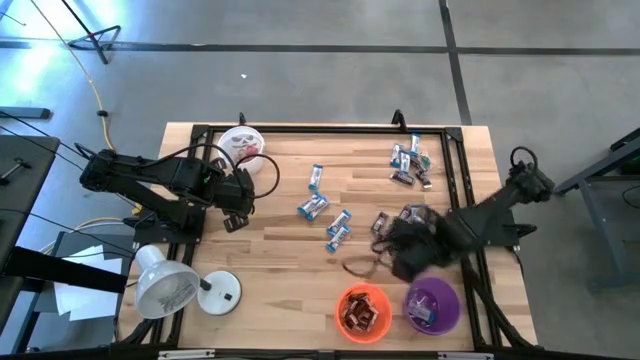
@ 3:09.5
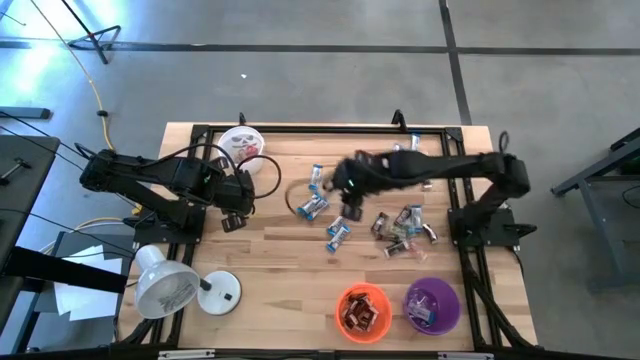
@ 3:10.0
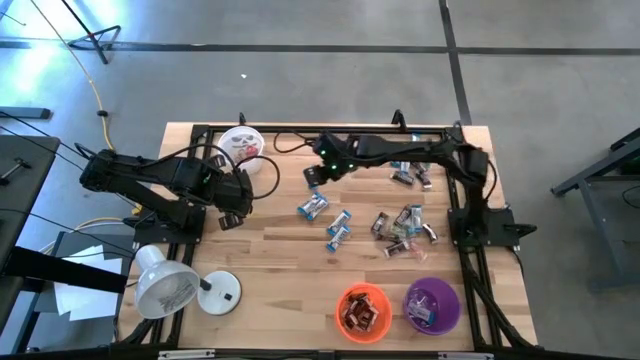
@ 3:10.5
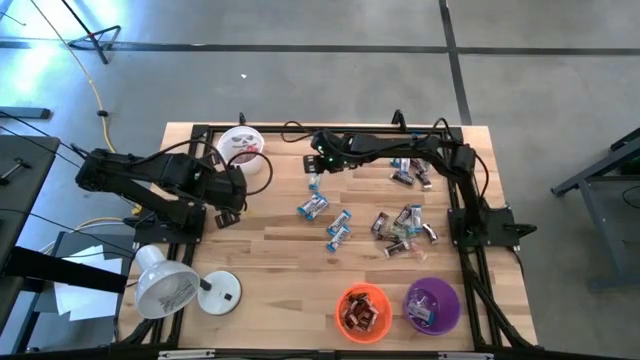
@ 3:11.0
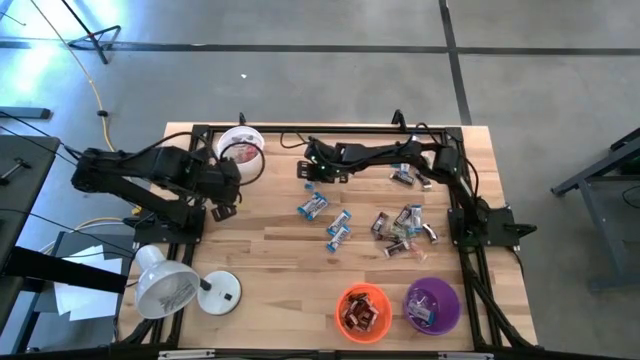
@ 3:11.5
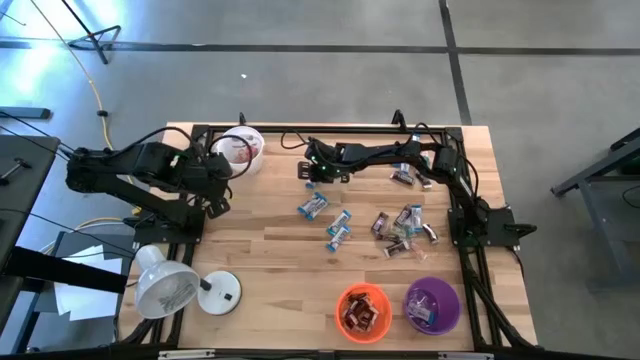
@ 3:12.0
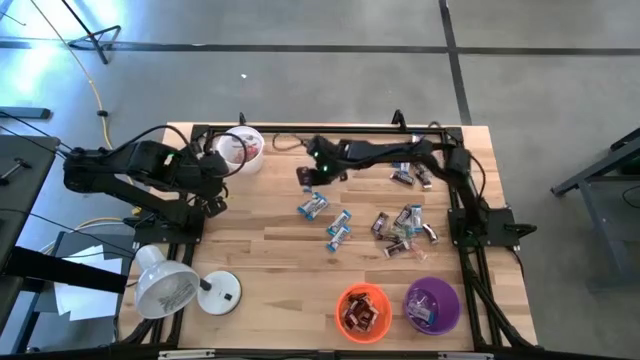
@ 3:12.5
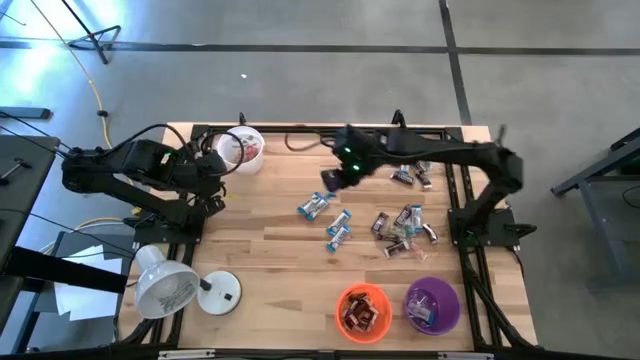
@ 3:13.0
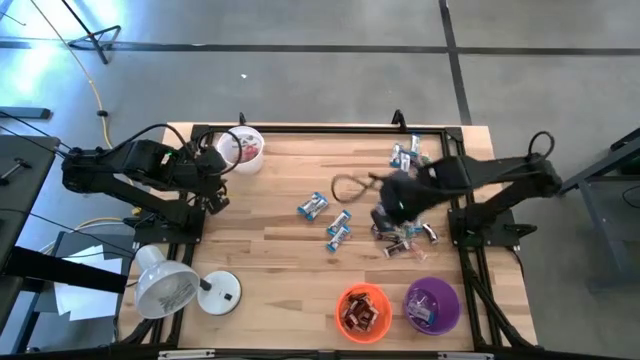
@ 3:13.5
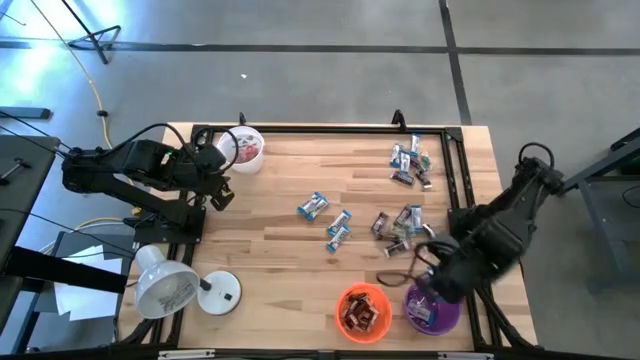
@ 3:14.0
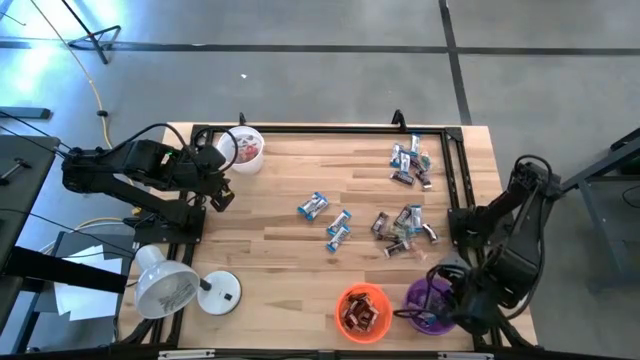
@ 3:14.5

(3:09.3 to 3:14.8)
Task: Organize candy in baskets
Put the white chocolate into the purple bucket

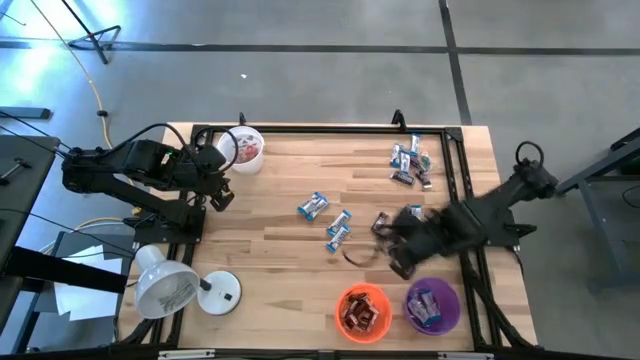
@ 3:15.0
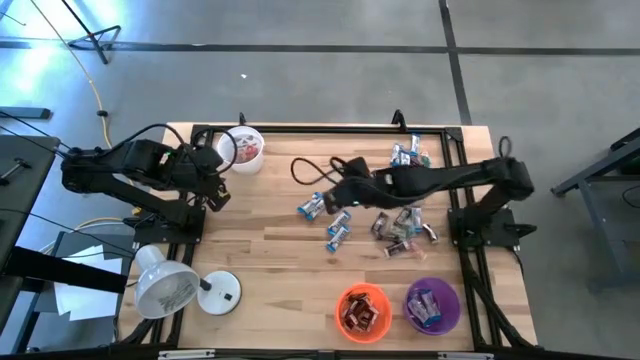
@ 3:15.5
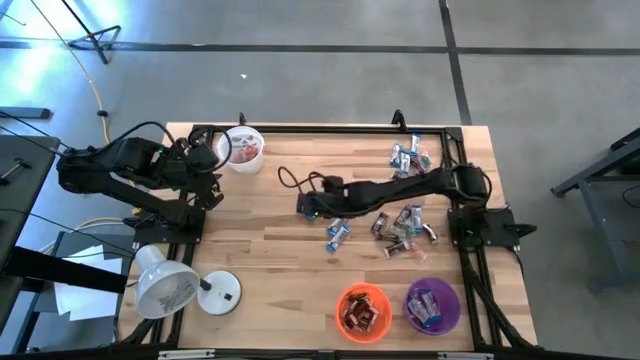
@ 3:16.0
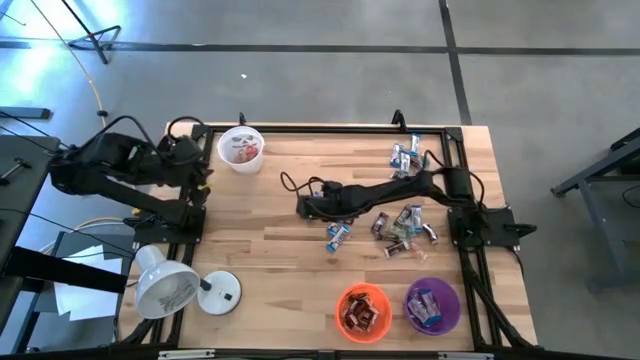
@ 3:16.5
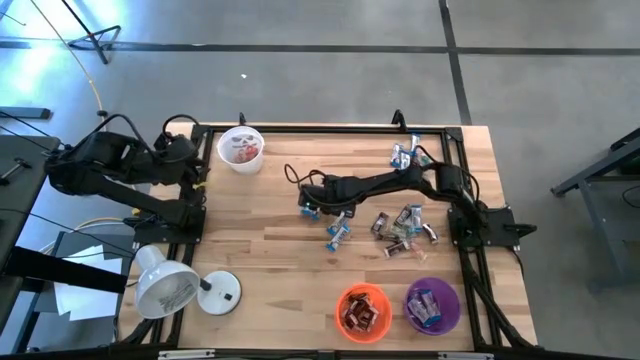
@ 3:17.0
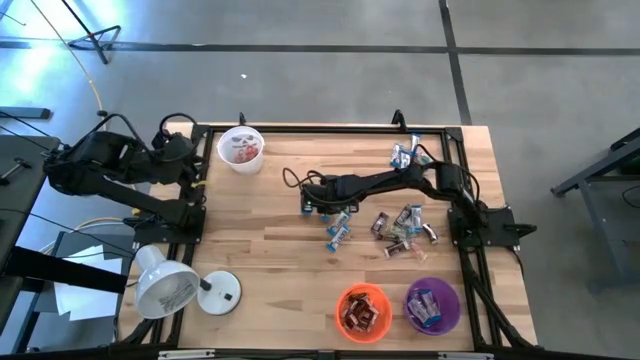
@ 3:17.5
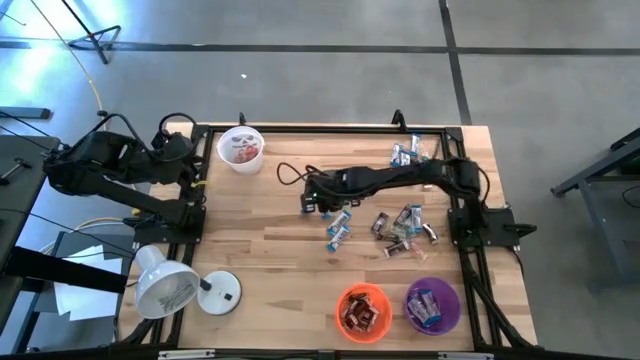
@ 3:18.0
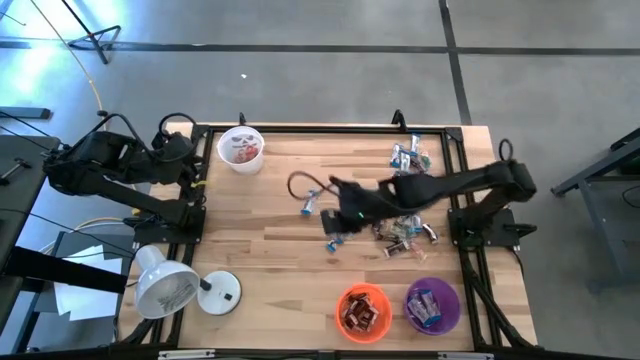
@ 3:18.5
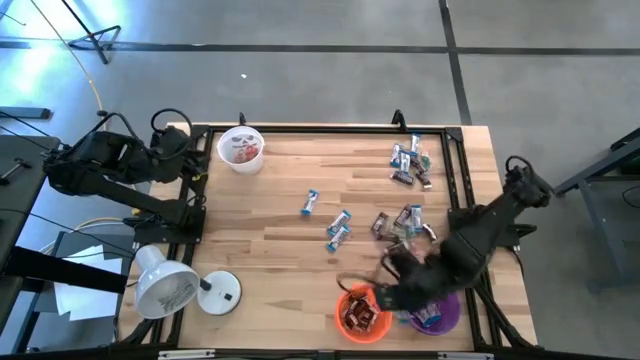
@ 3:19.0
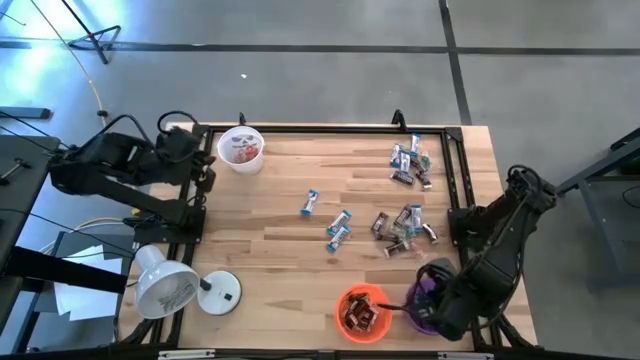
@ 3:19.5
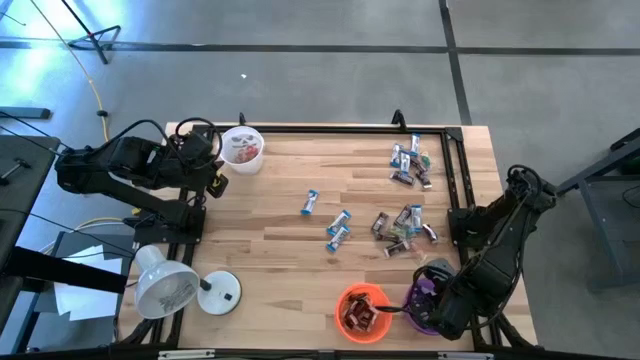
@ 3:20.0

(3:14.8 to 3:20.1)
Put the white chocolate into the purple bucket

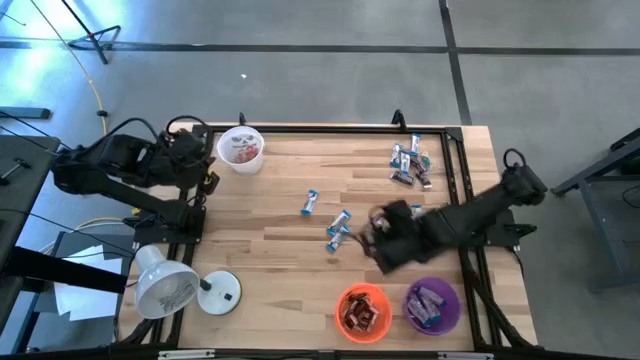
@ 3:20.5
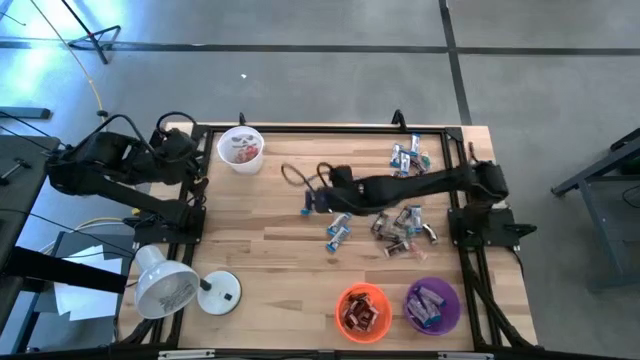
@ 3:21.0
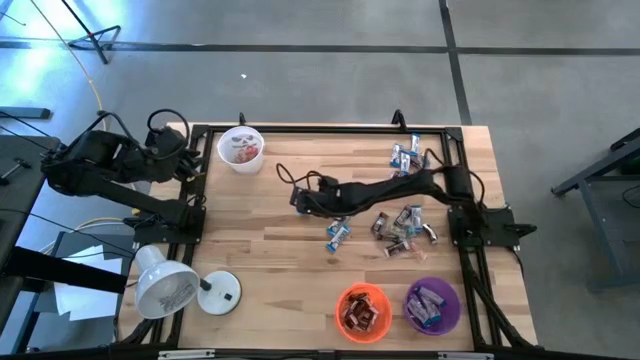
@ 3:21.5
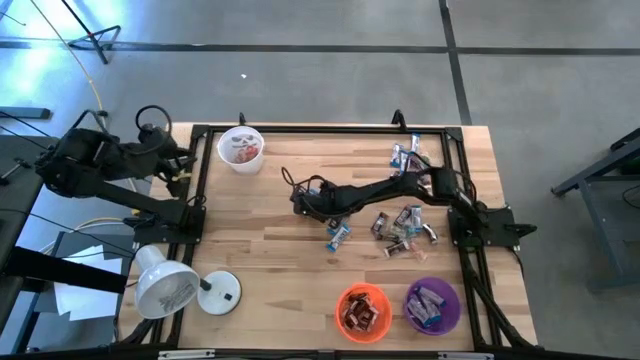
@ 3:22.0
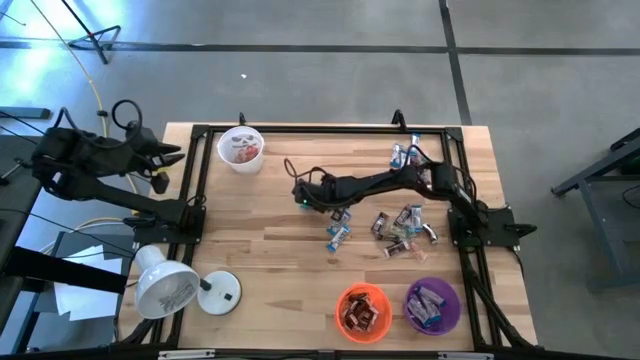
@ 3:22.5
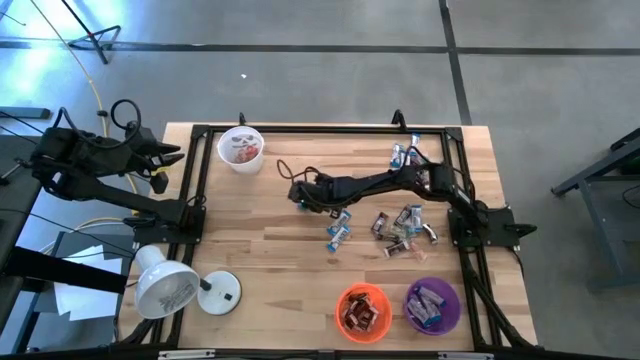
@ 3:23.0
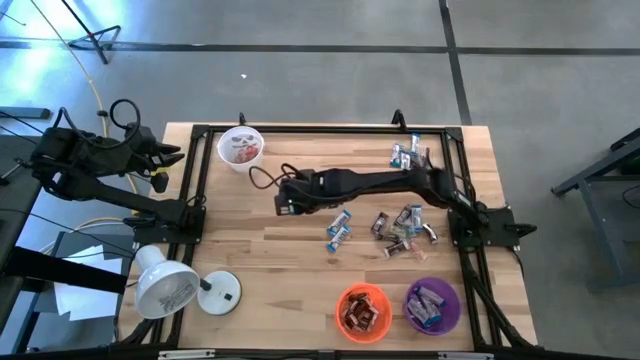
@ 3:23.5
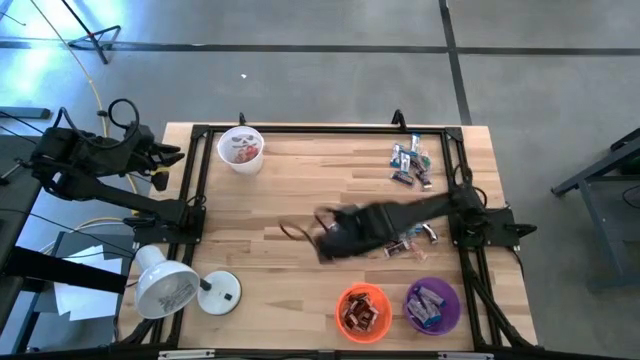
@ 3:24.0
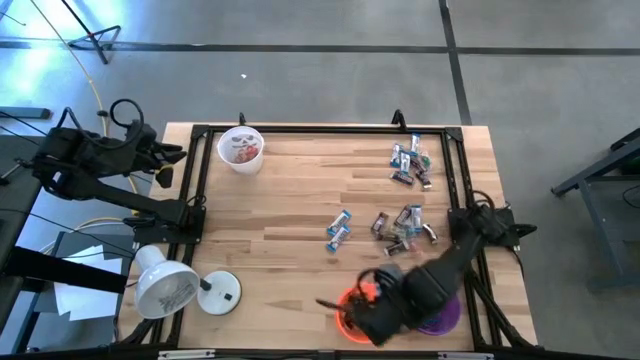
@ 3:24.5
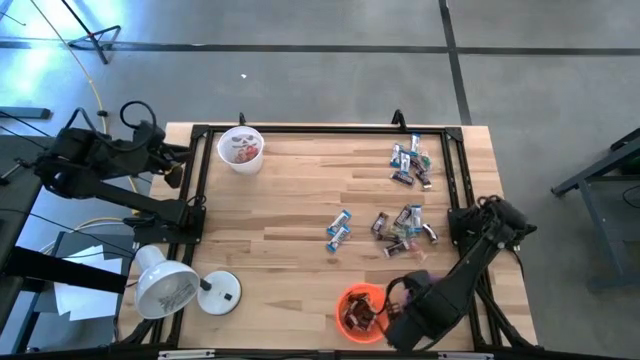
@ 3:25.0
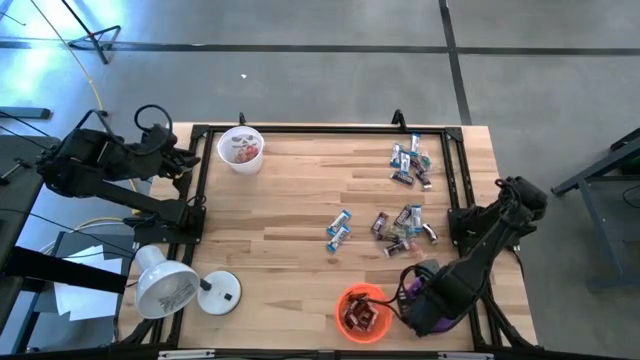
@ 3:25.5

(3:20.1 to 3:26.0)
Put the white chocolate into the purple bucket

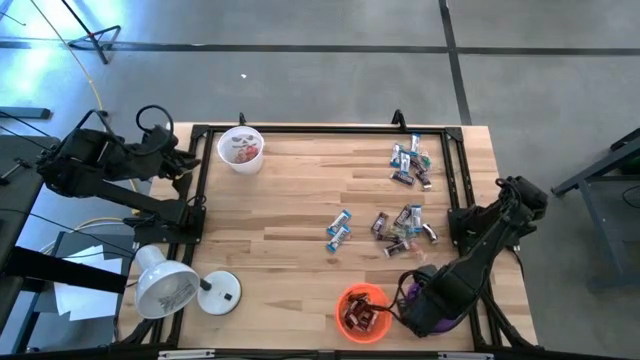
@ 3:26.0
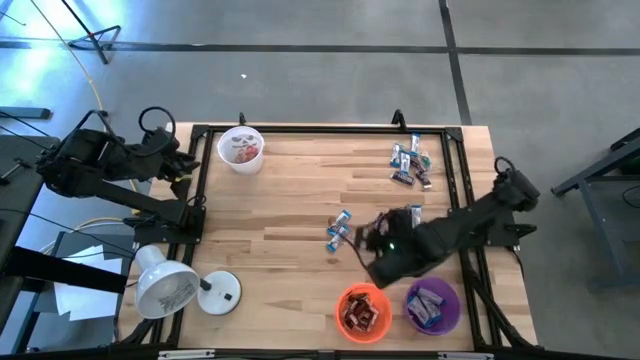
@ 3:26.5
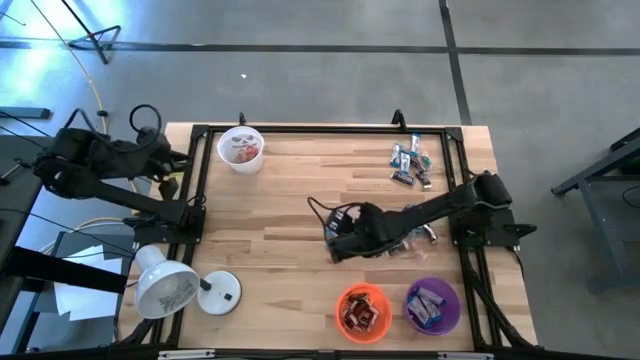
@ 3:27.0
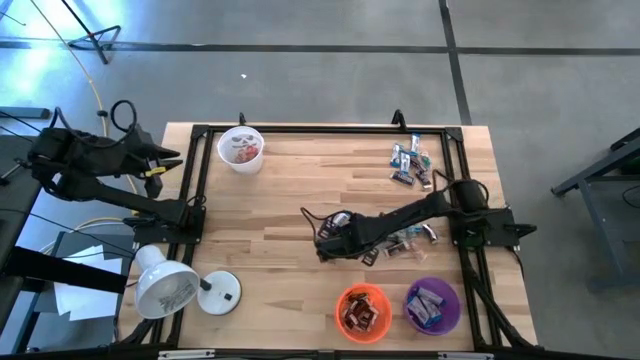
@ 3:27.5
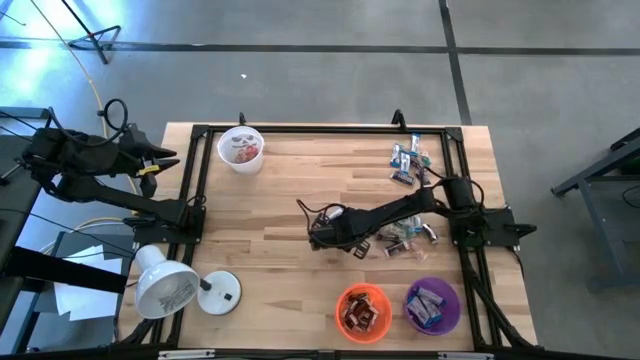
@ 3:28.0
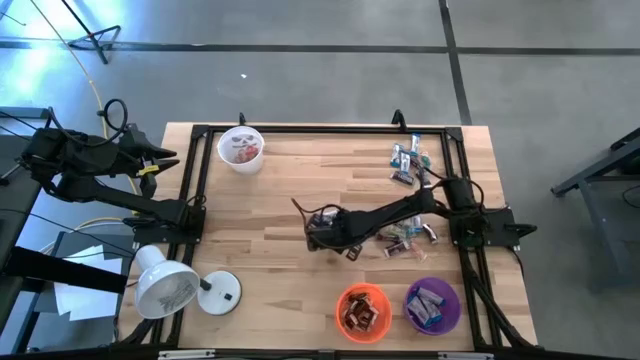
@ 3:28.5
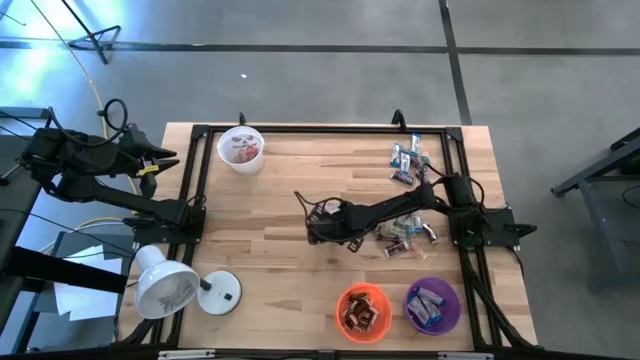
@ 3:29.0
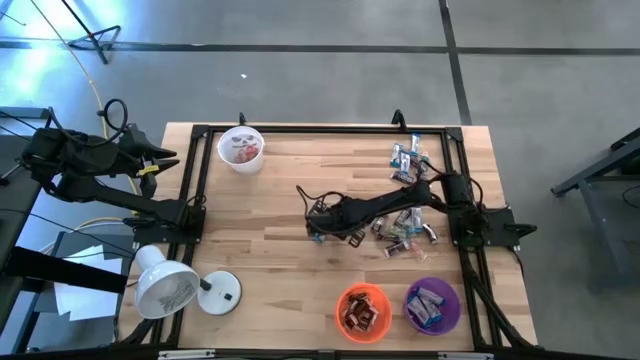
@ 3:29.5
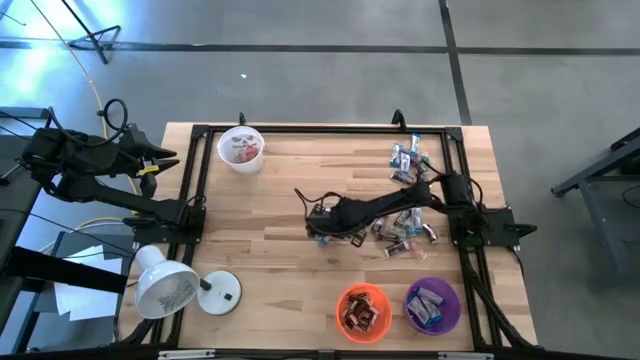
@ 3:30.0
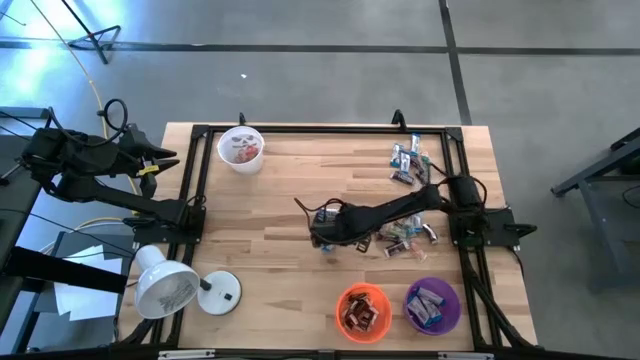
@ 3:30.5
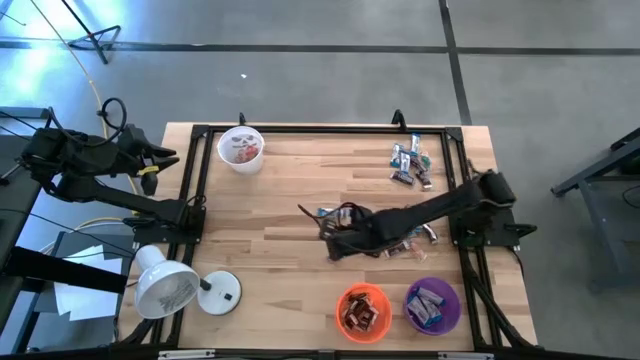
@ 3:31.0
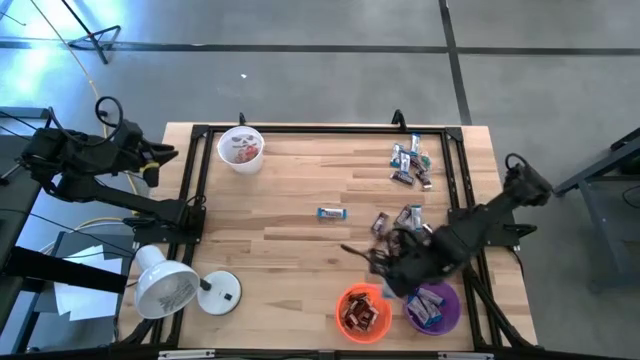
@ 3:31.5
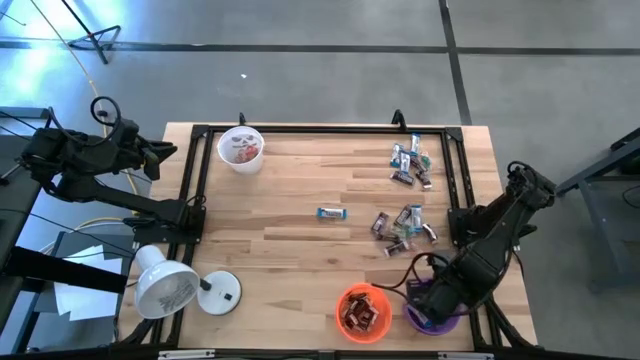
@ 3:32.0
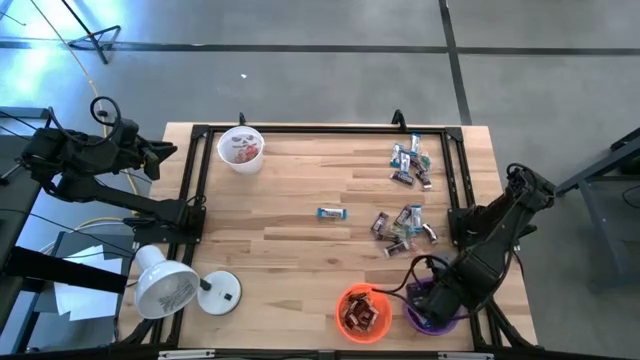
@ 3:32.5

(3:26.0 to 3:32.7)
Put the white chocolate into the purple bucket
